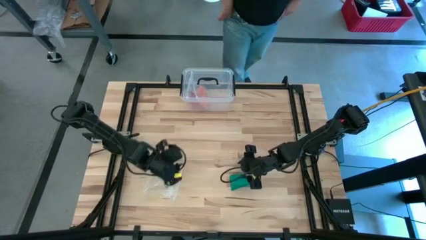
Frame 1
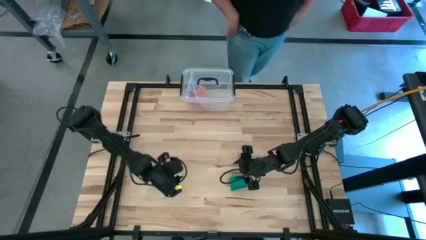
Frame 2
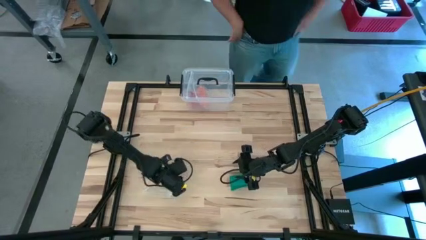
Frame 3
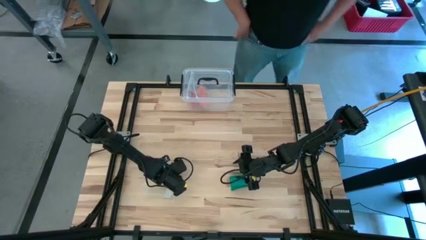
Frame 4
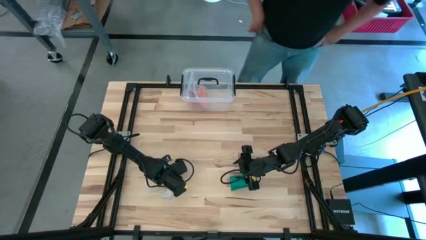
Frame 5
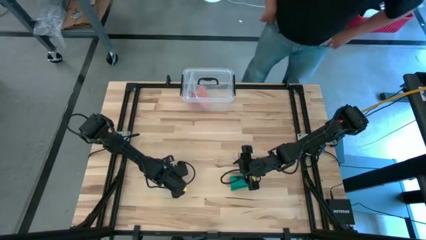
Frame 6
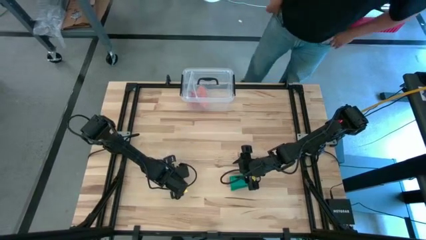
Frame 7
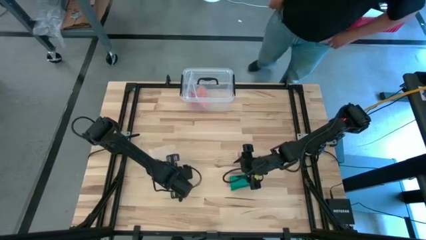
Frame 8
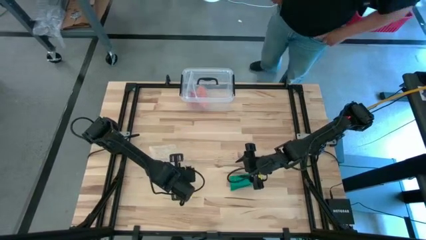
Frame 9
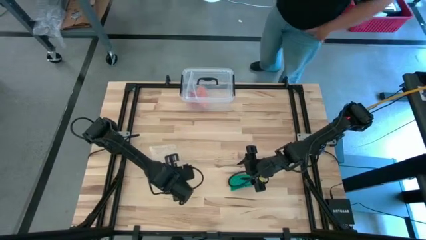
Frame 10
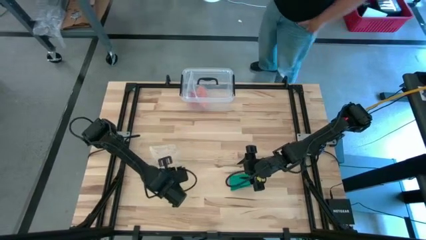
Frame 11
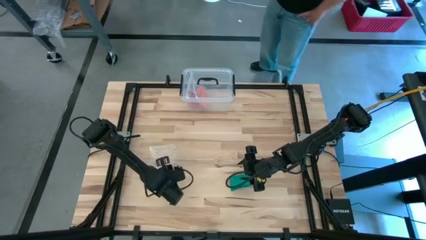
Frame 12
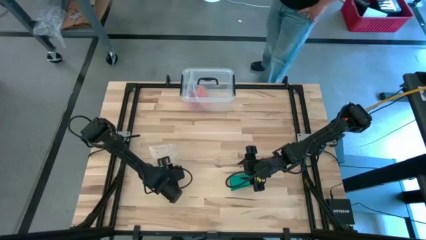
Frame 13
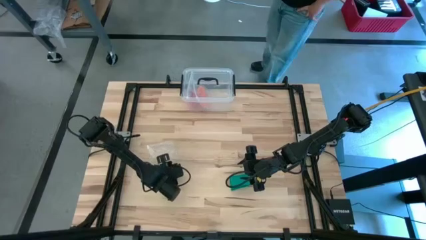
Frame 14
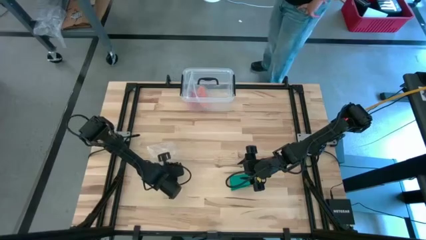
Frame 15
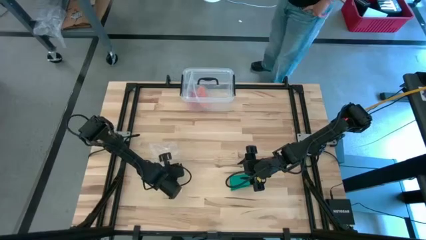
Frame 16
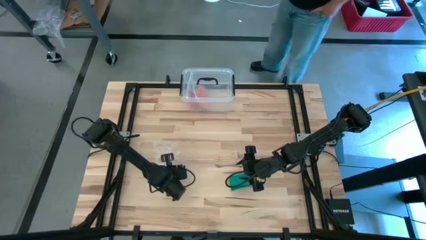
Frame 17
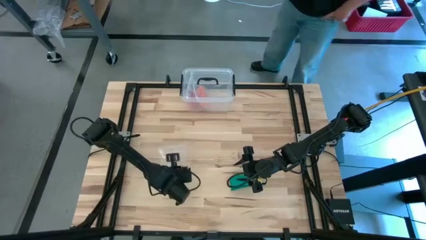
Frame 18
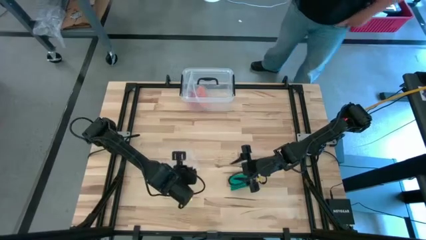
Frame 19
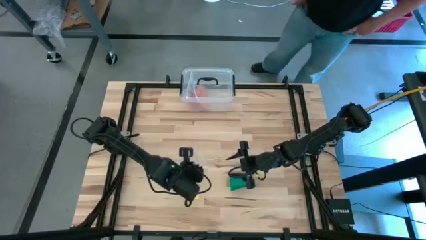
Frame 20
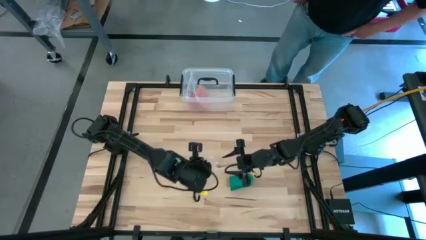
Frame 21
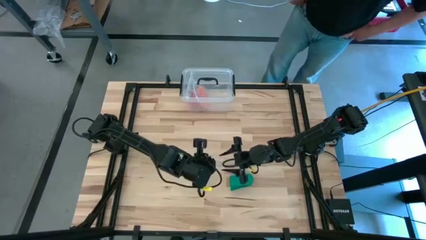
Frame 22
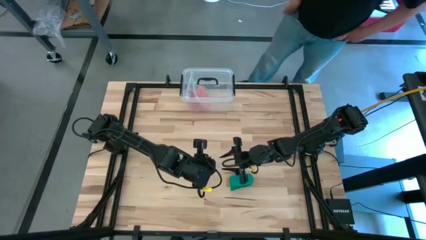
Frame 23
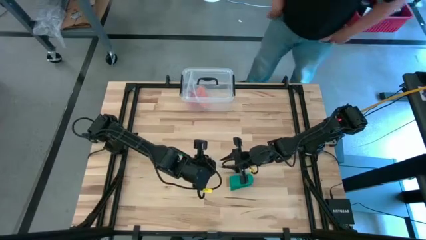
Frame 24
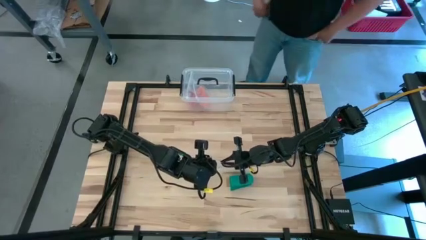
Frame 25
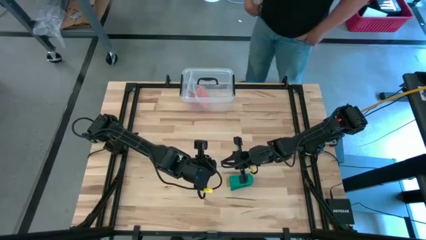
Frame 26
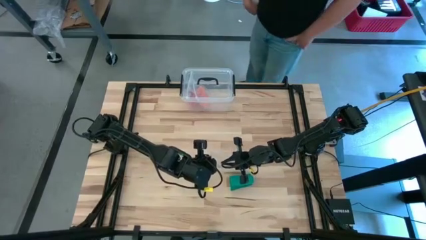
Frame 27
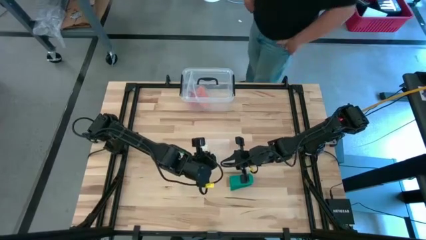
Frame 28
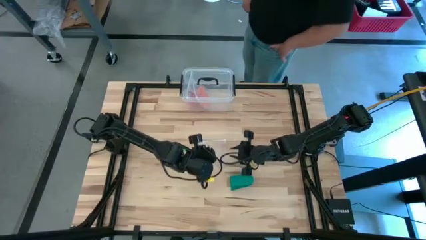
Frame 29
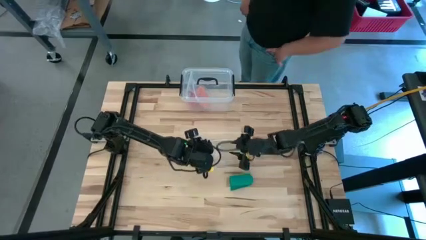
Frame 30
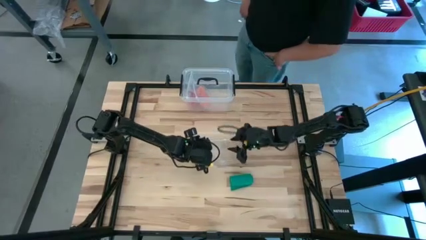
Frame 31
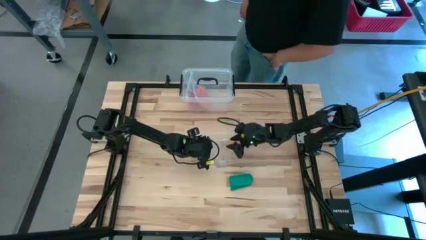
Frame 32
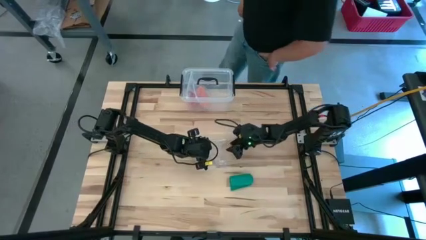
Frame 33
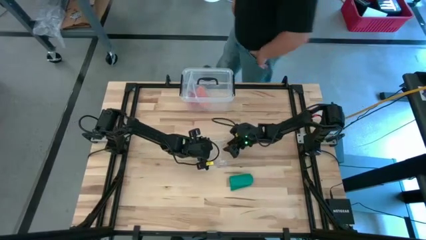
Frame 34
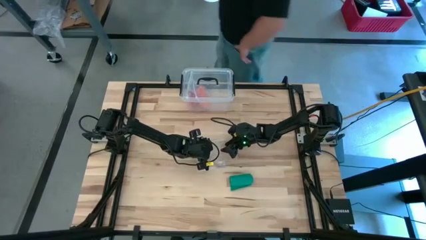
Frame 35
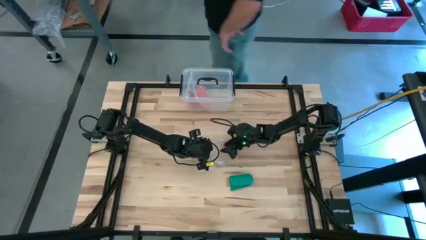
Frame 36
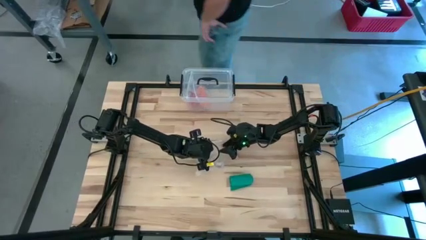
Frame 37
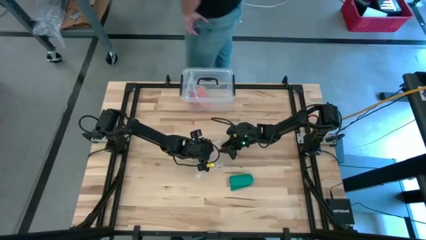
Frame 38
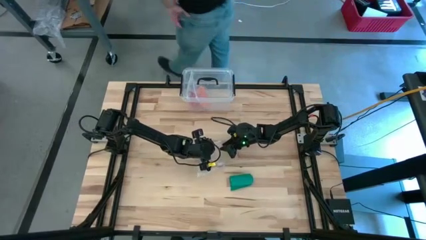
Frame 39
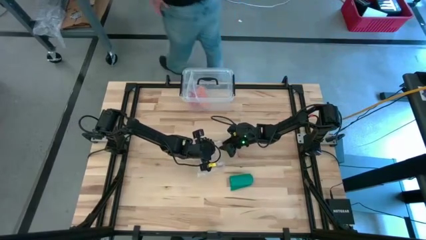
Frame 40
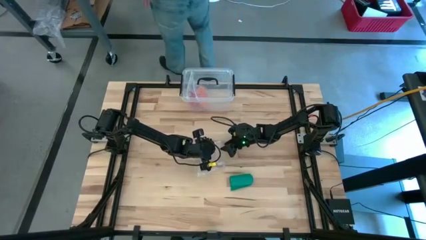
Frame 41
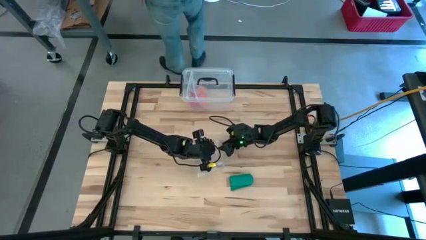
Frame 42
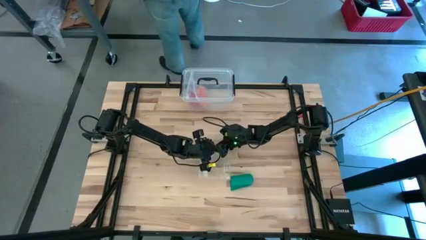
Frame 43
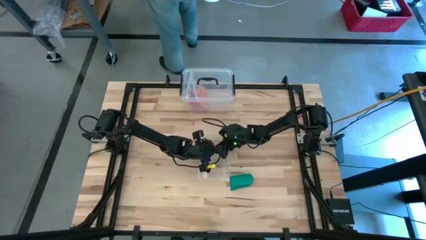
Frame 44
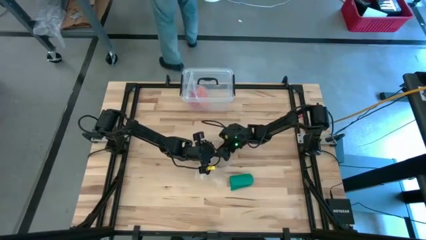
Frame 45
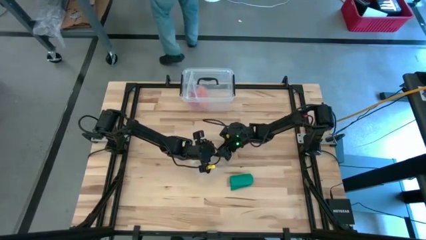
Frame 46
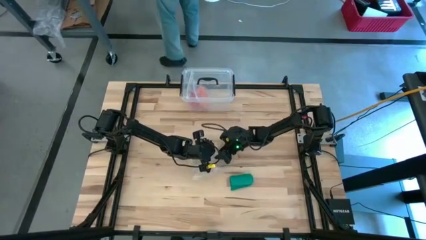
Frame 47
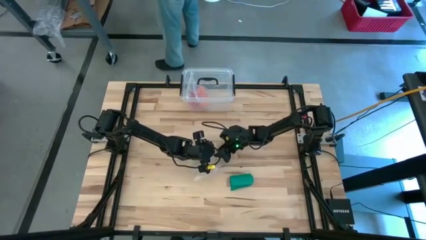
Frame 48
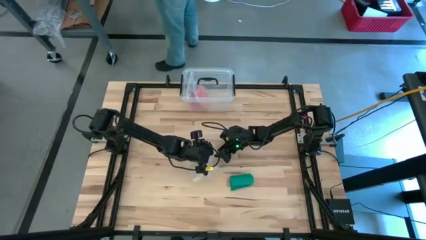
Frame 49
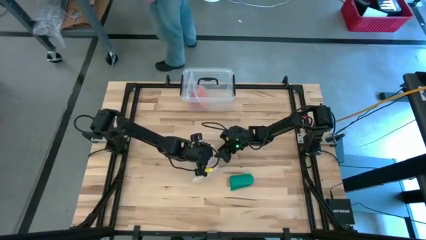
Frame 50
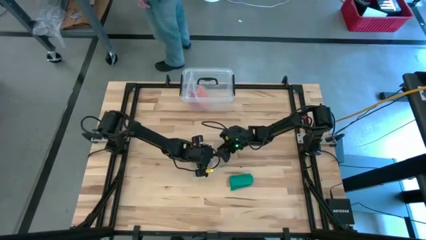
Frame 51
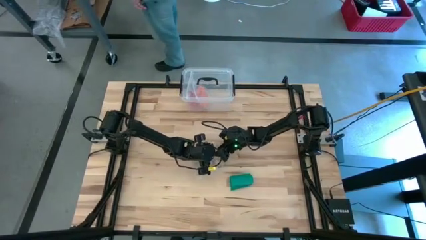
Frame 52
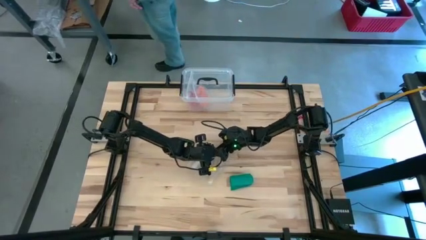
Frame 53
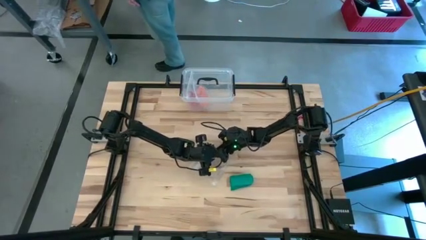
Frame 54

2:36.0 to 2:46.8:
Task: Roll bandage
Open the transparent zip bag
